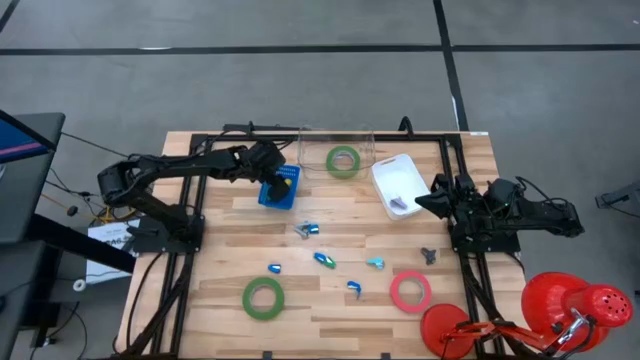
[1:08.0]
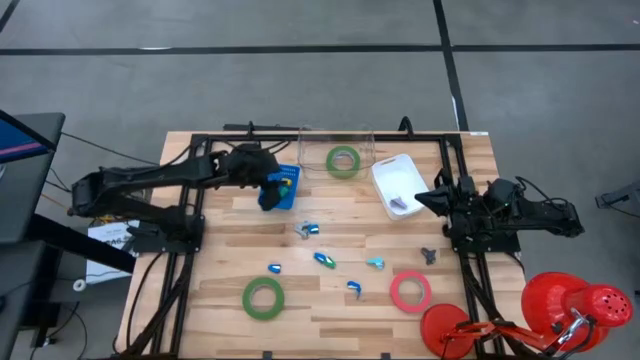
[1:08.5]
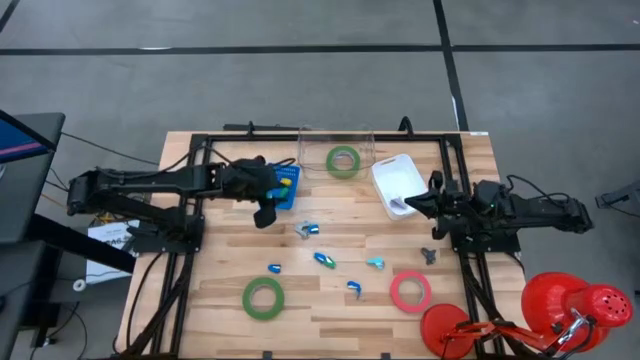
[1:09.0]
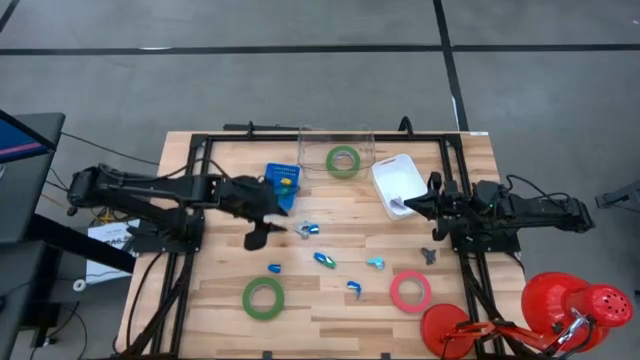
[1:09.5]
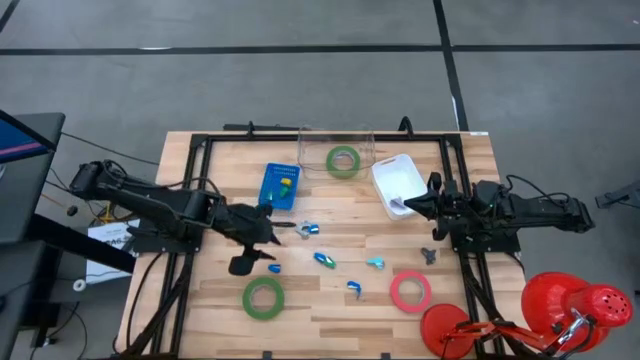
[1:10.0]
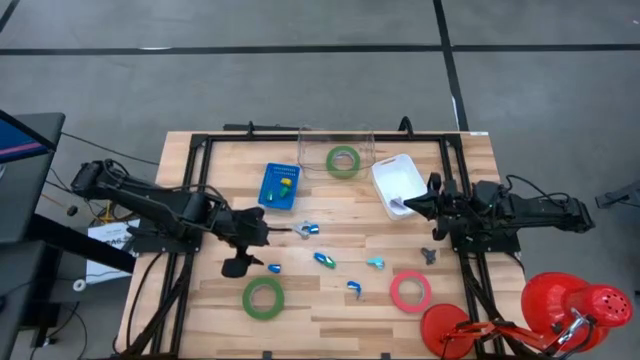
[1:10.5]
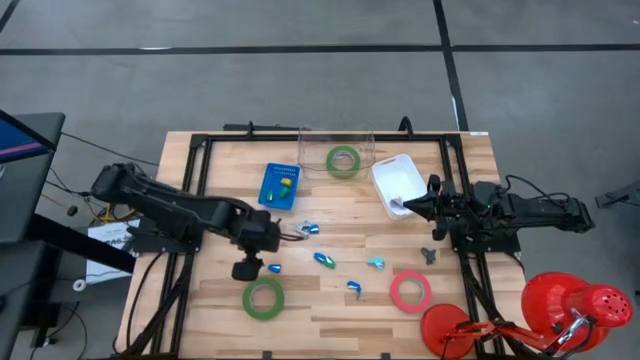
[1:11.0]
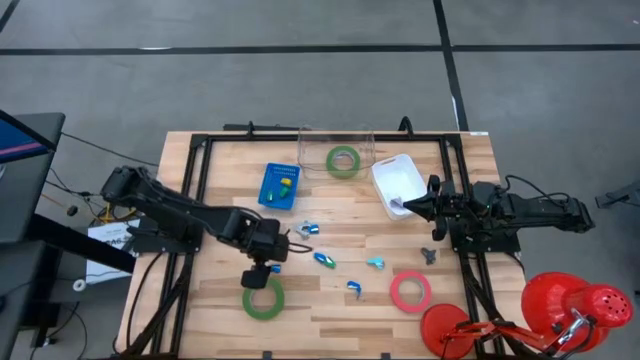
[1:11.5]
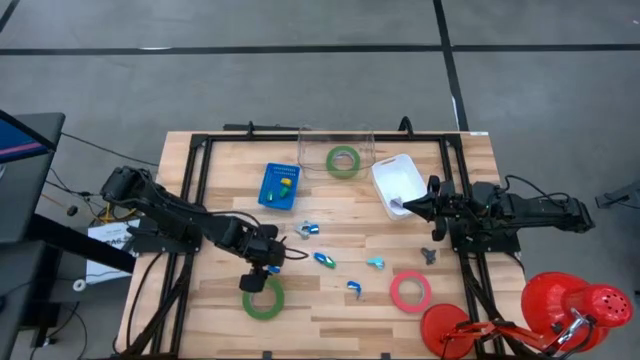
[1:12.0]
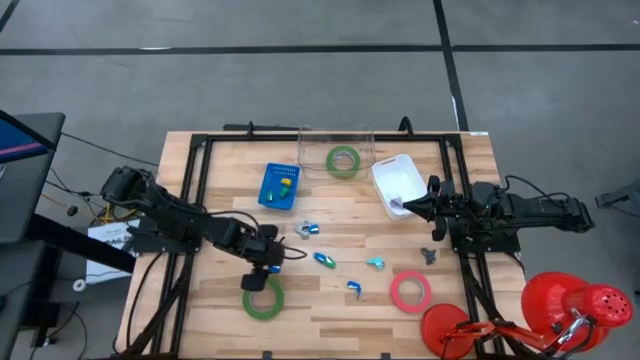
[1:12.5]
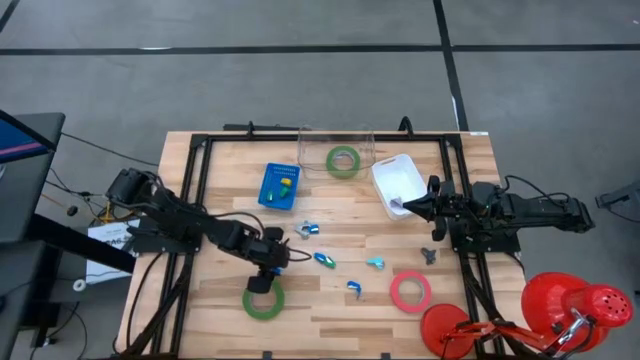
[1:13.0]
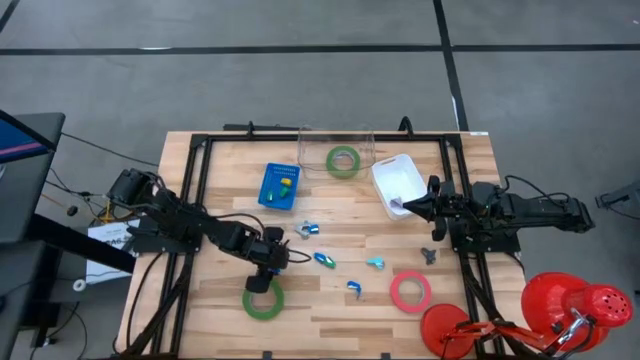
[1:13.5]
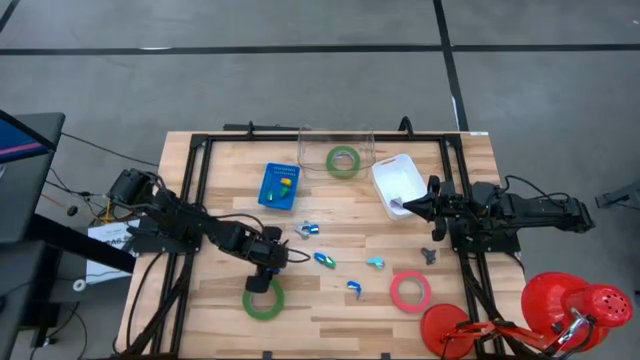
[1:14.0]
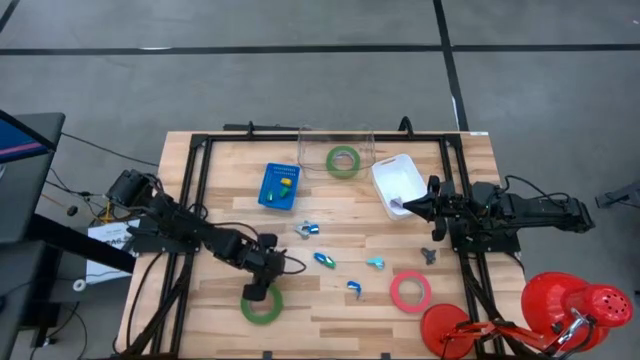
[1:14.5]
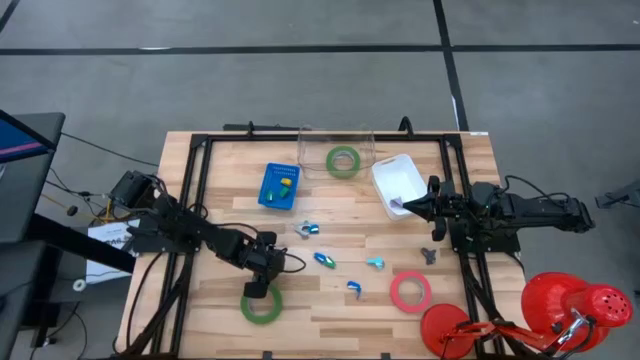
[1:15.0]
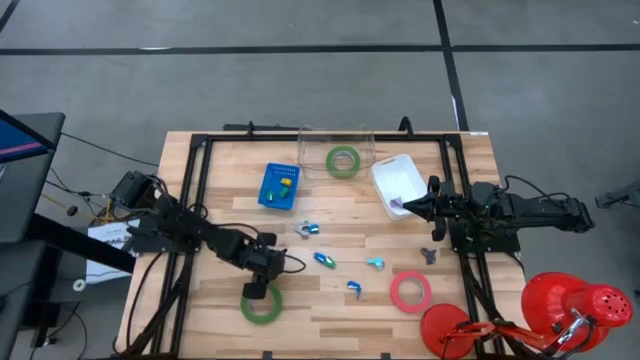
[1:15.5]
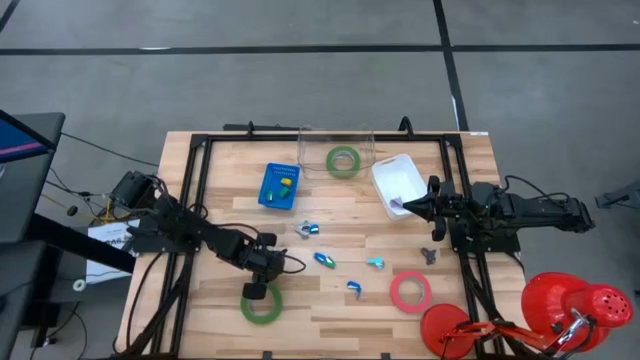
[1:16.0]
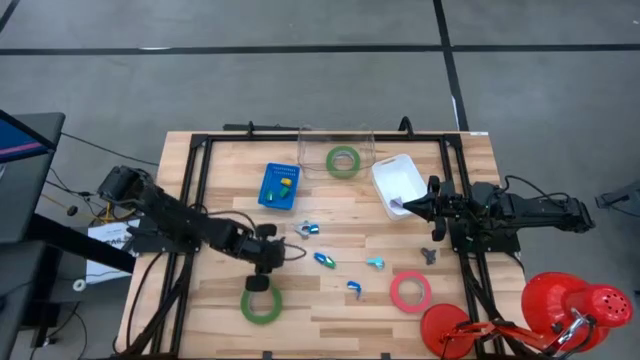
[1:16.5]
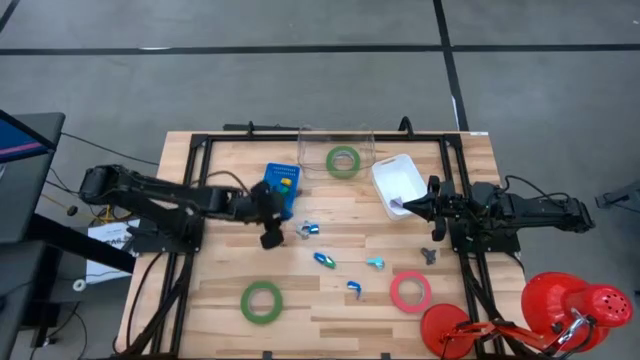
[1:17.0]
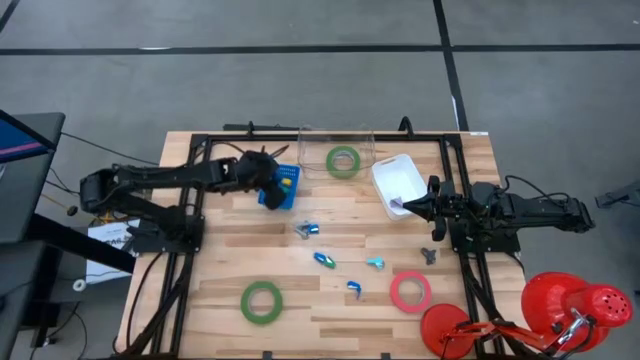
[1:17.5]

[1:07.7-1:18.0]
Task: Pick and place Stapler, Stapler remover, tape
Put the middle left blue stapler into the blue bin

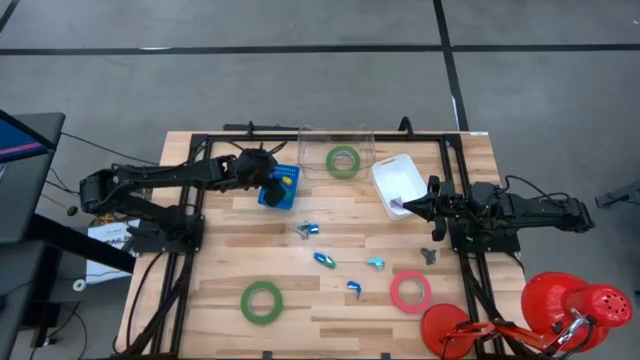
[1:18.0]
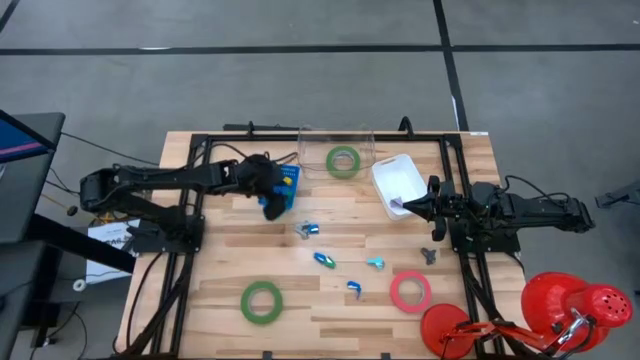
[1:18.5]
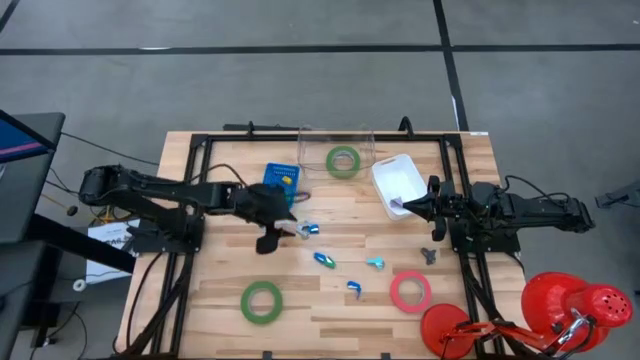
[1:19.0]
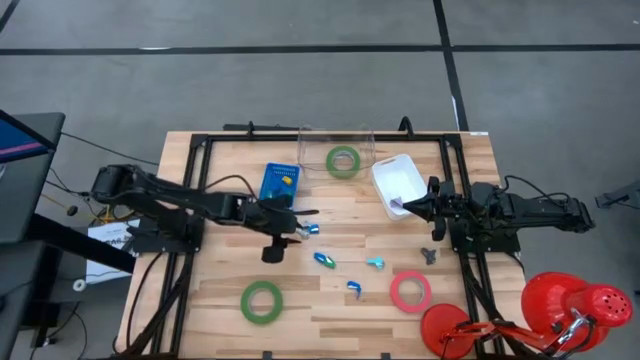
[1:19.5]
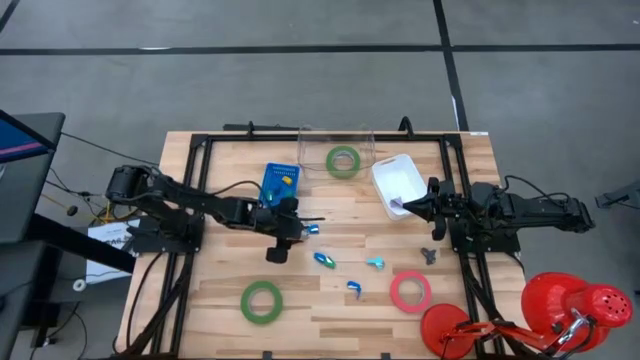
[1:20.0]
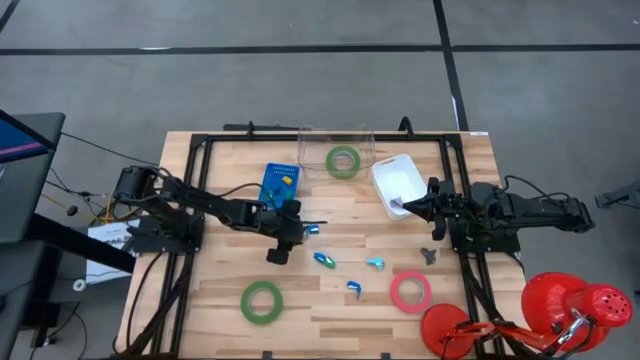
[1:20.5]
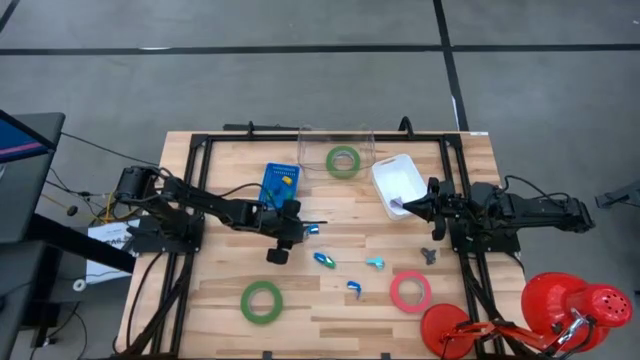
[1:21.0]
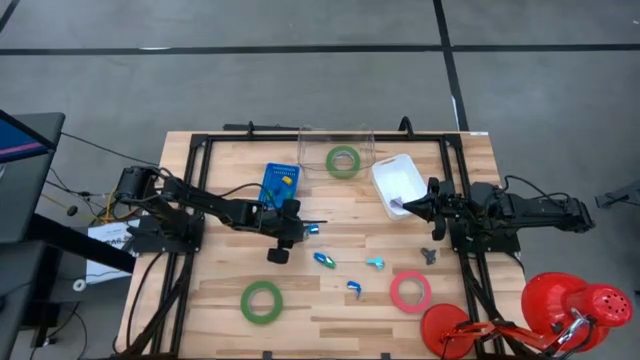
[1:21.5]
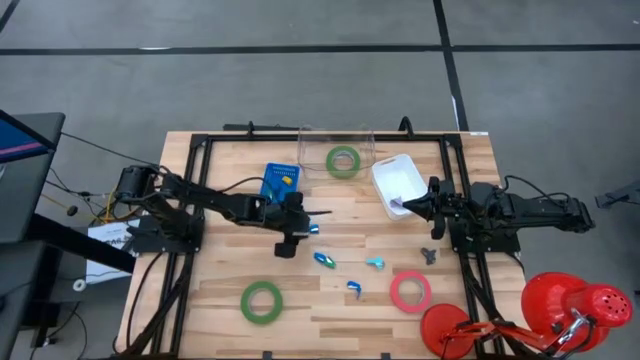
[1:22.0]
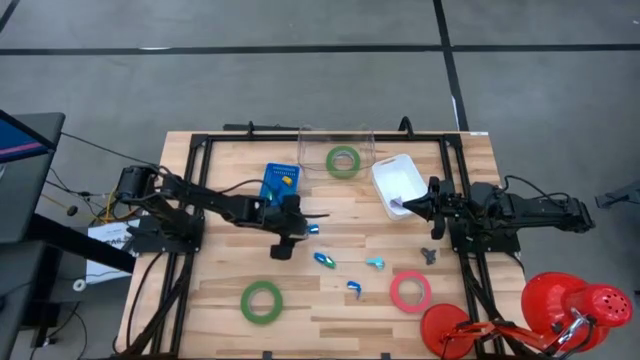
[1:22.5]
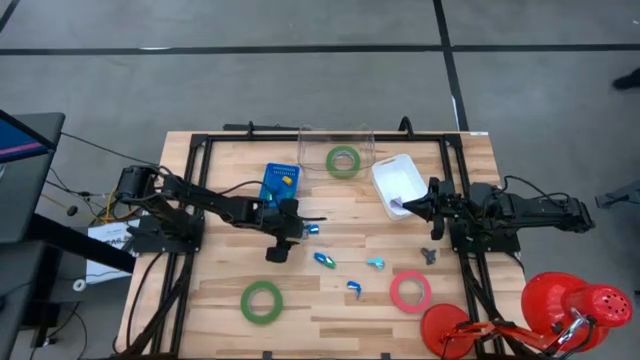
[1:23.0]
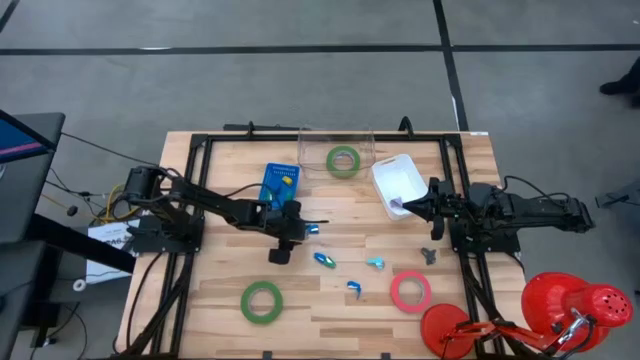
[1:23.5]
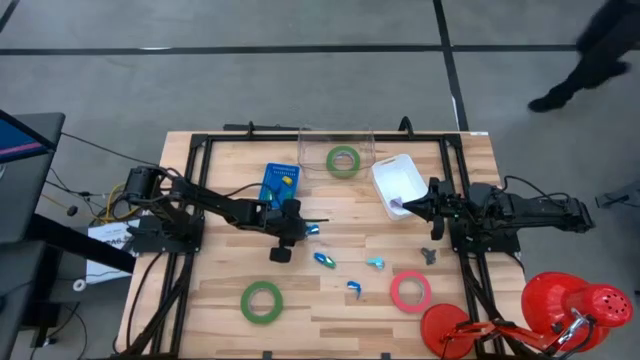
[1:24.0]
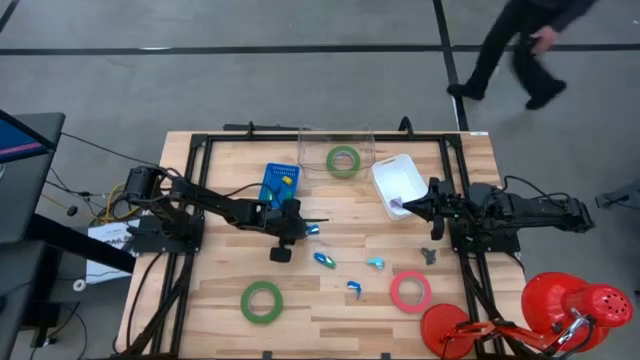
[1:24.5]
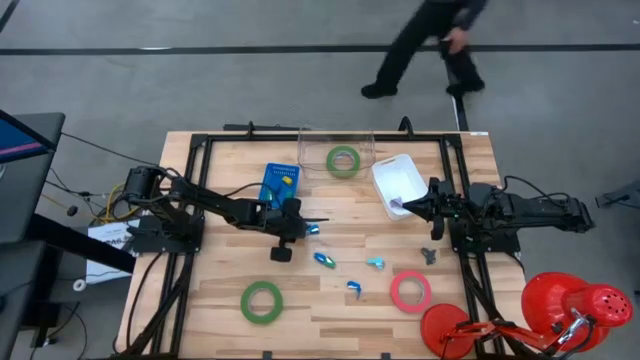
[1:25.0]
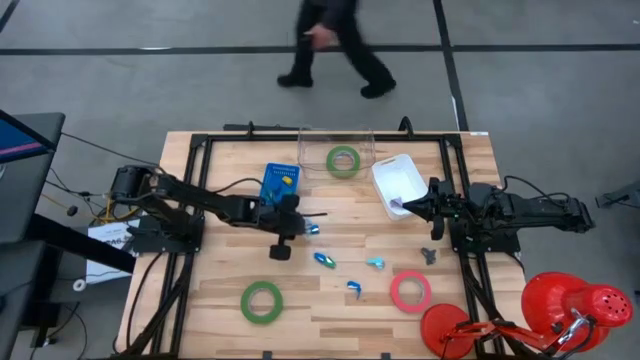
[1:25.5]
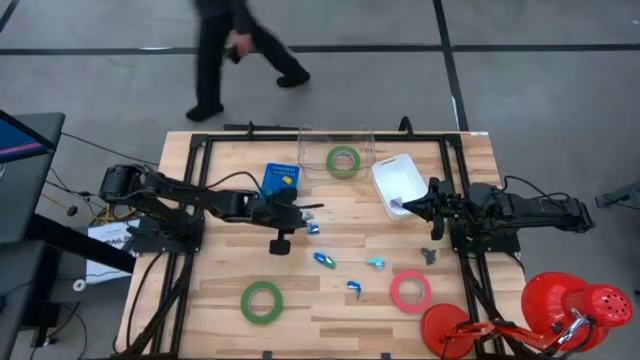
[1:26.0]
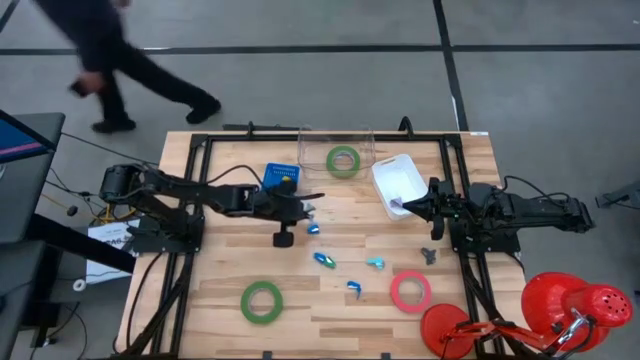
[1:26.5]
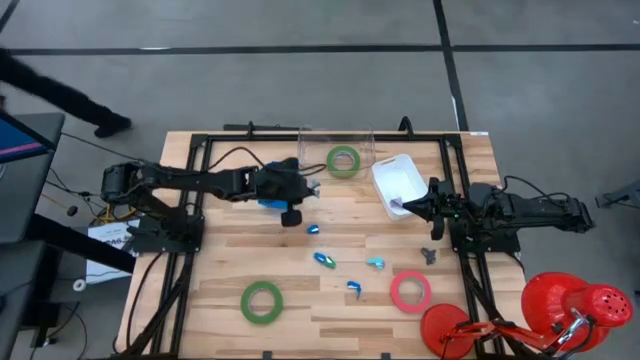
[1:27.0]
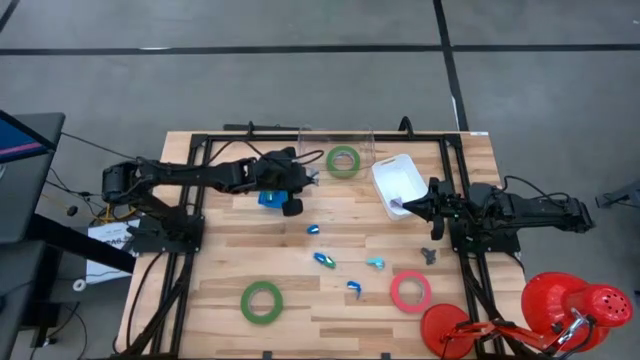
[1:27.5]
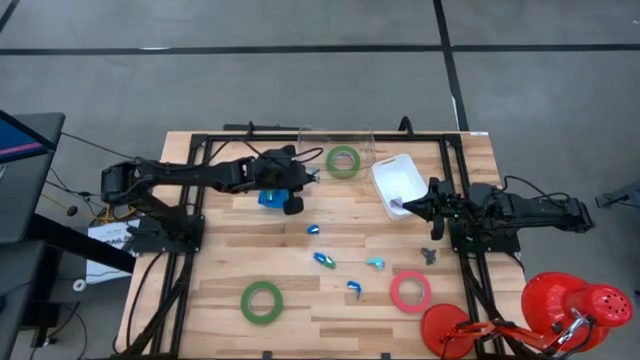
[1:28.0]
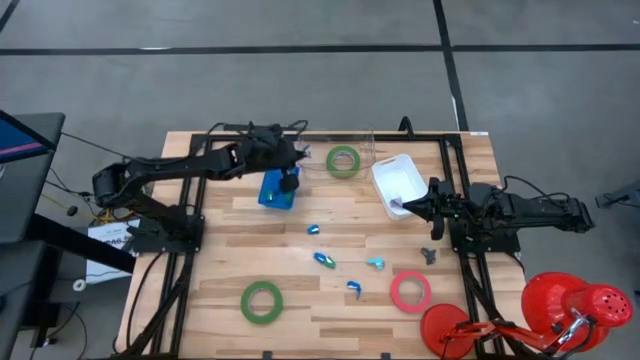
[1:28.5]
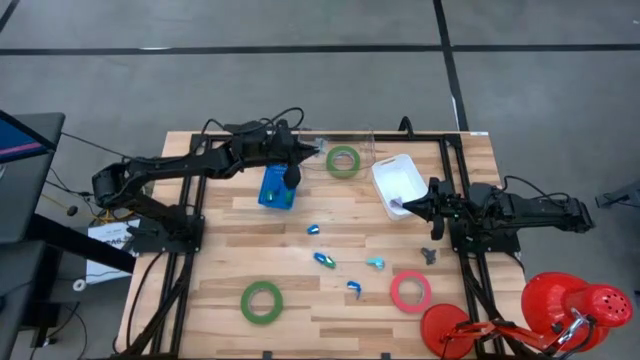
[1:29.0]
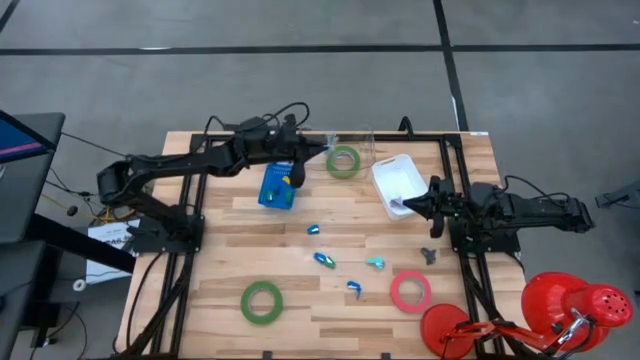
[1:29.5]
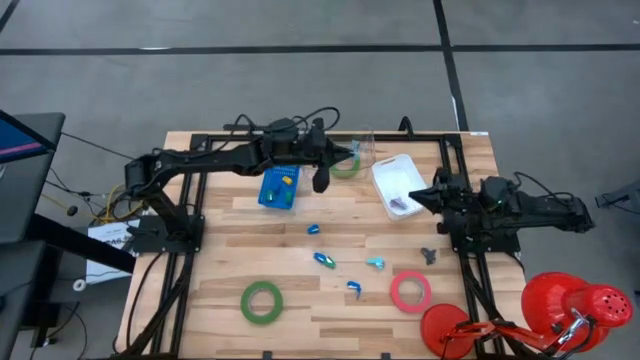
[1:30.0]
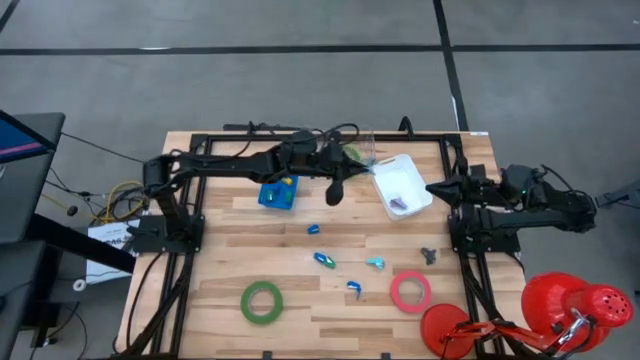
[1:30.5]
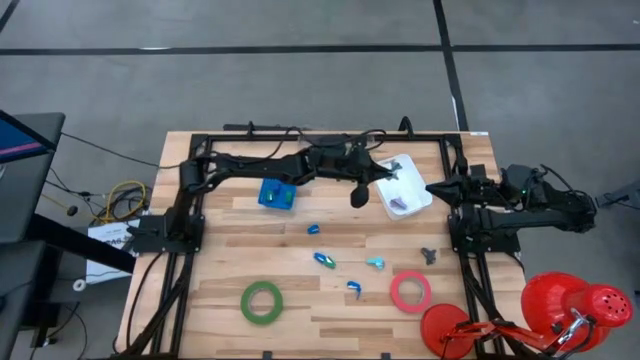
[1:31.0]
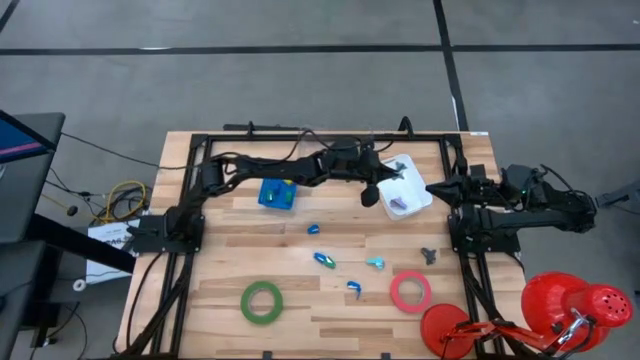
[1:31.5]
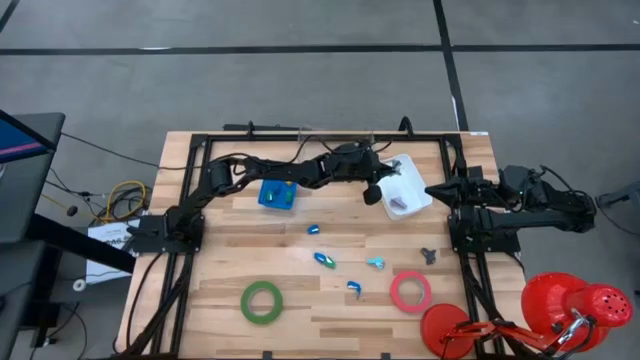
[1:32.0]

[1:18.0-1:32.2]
Put the gray staple remover into the white bin
